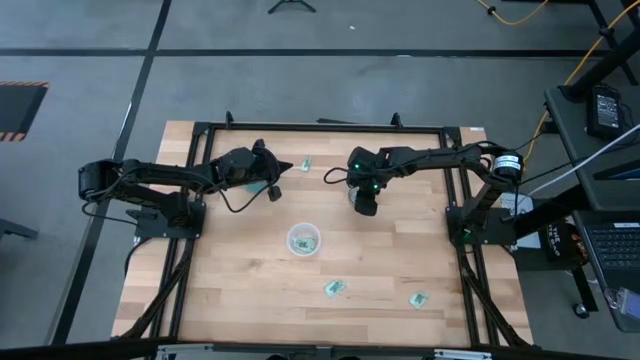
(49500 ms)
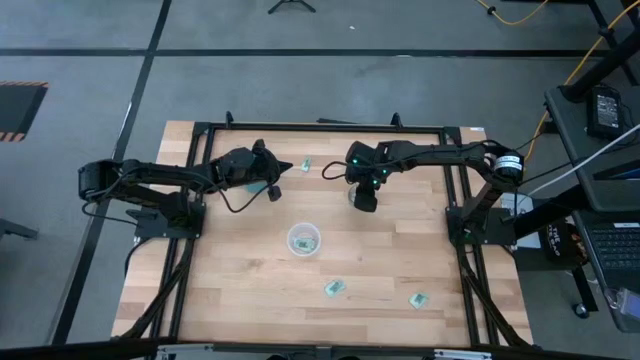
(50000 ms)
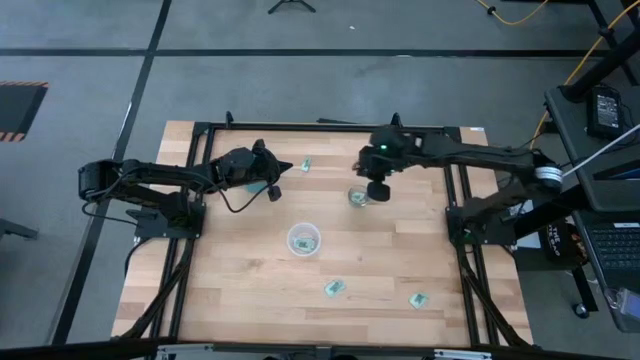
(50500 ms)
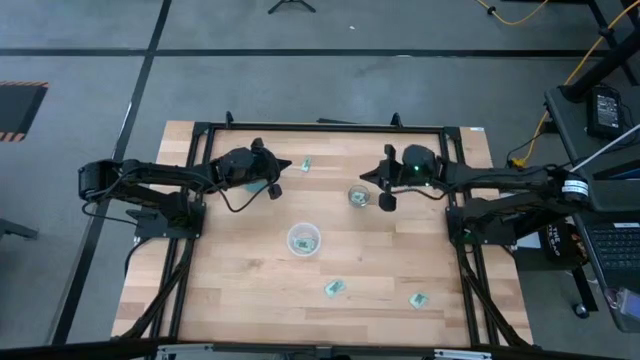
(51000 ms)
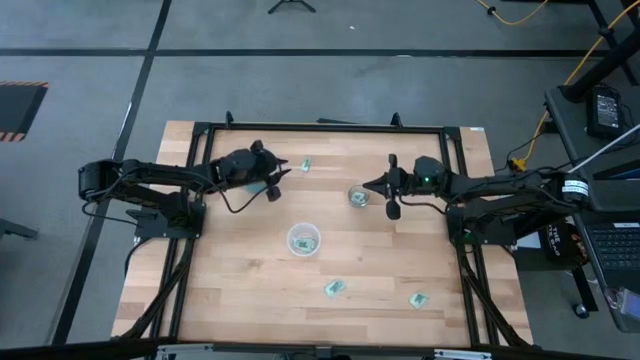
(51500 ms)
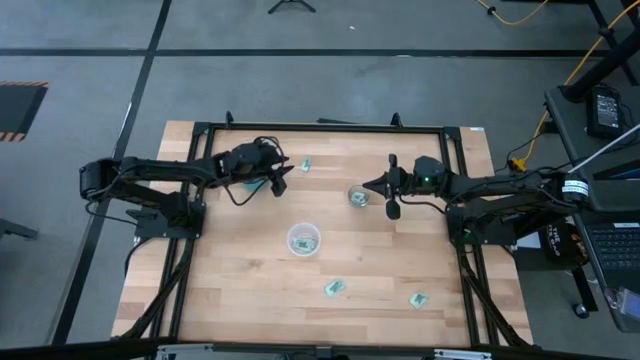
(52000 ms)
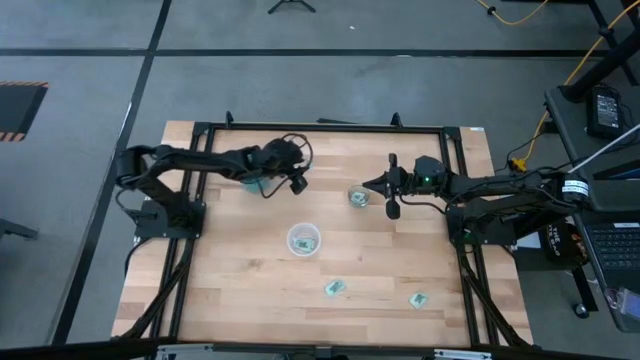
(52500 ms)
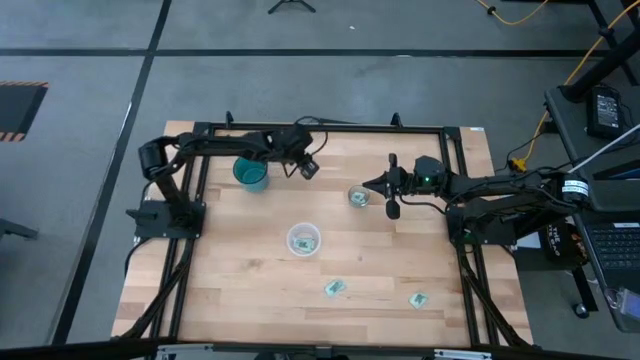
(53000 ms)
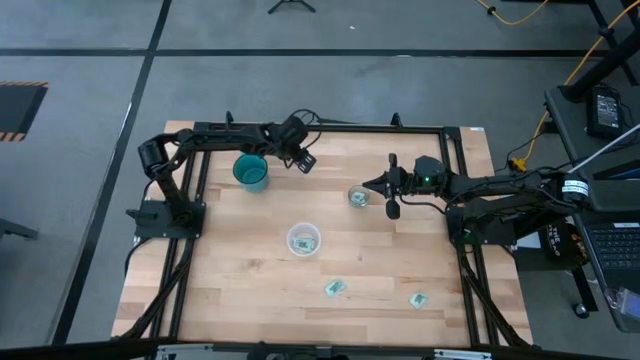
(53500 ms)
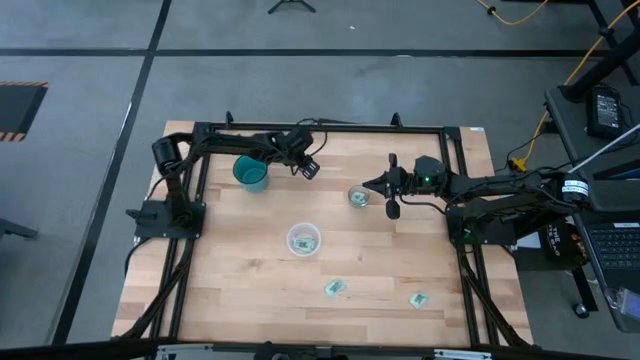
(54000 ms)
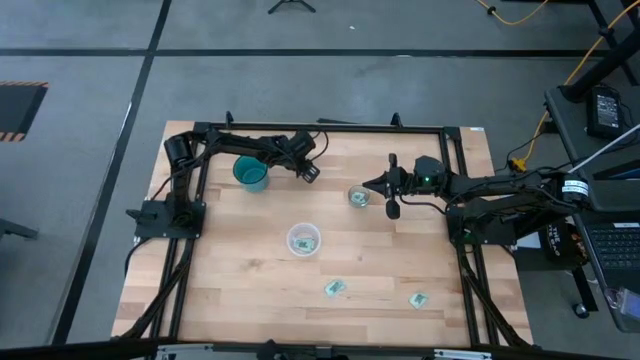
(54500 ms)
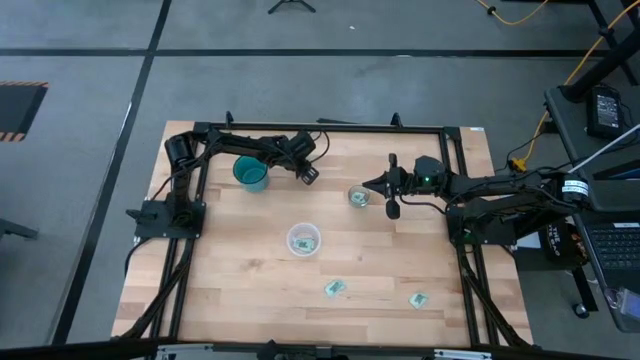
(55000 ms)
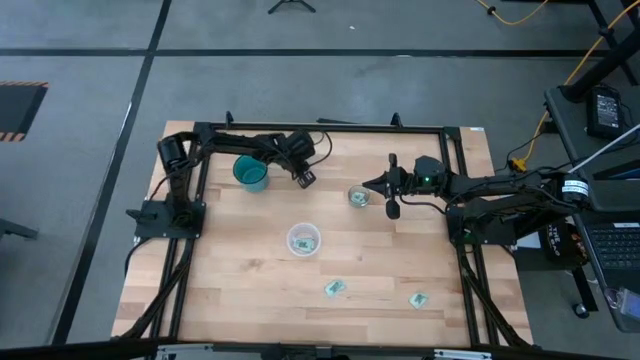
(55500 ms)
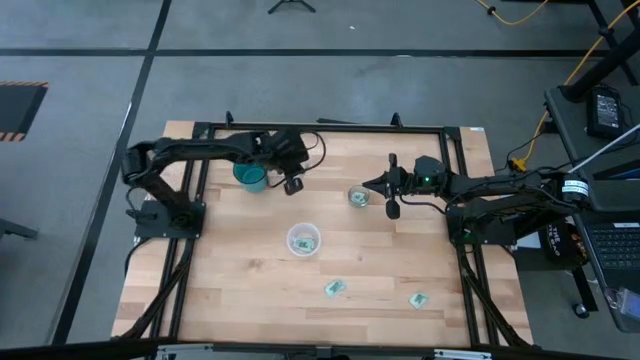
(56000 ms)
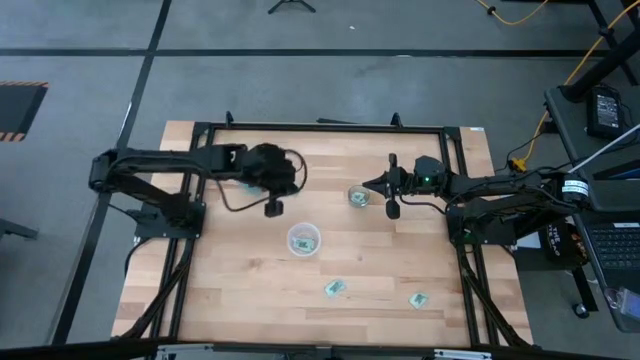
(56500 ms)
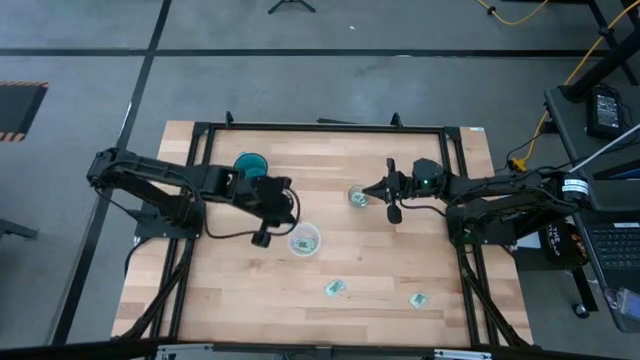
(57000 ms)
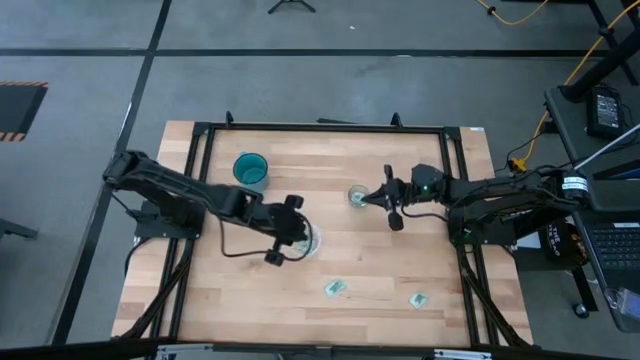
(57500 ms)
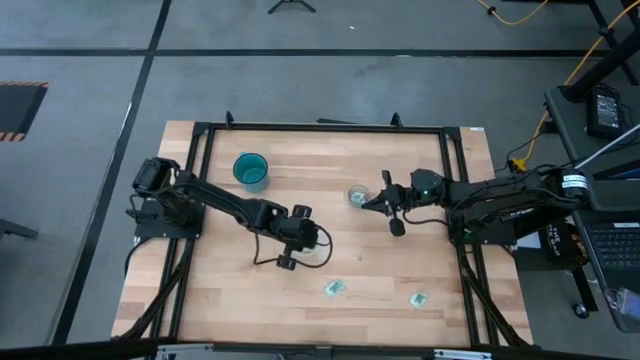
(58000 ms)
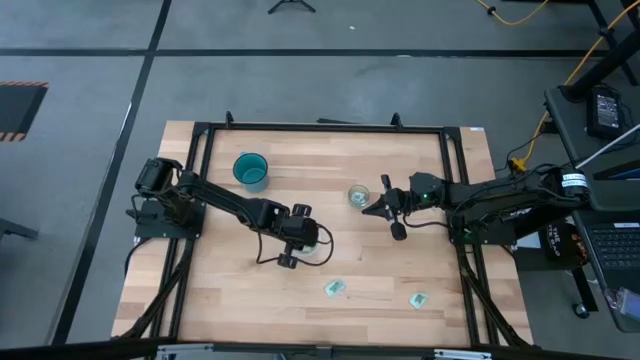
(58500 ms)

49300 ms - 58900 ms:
Task: Pick and place Stevia / Truvia into bins
Put the white stevia packet into the transparent plastic container

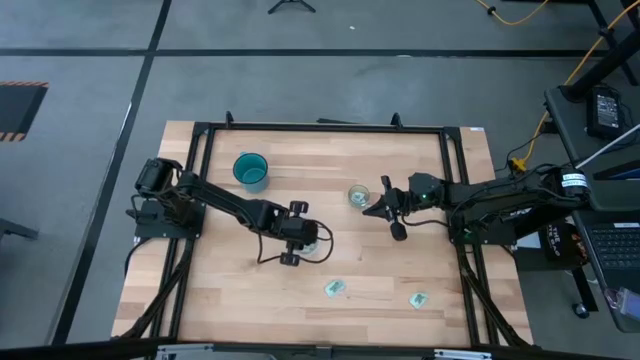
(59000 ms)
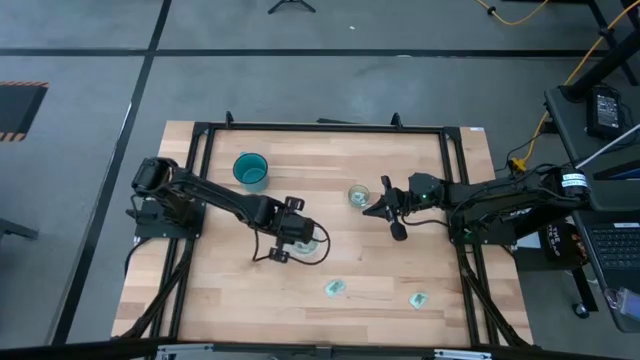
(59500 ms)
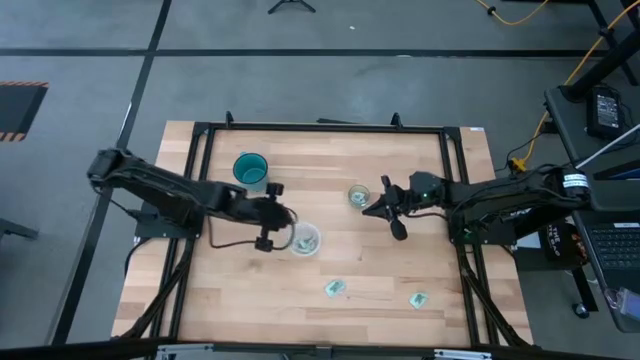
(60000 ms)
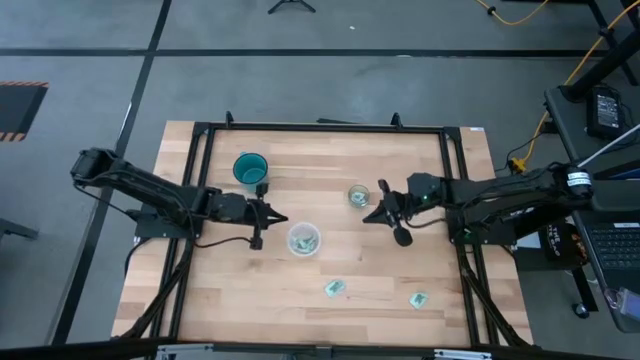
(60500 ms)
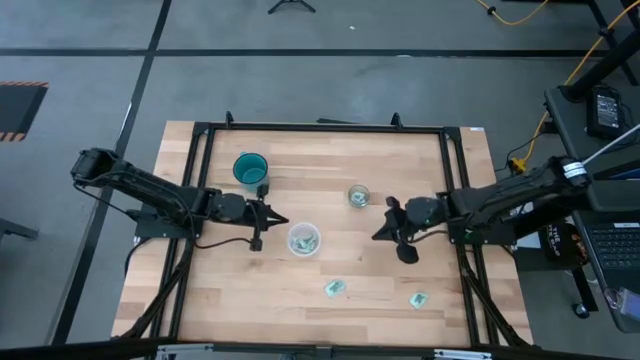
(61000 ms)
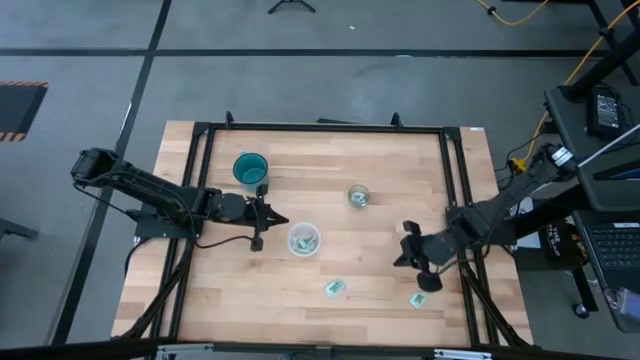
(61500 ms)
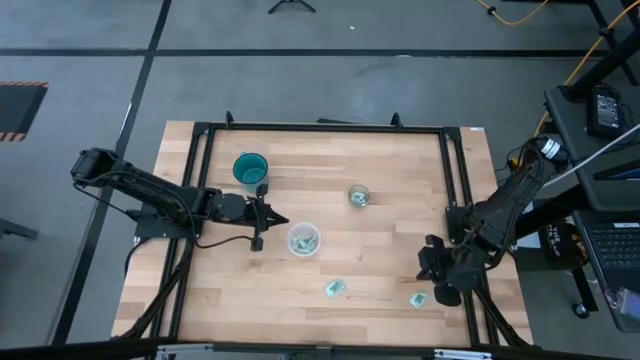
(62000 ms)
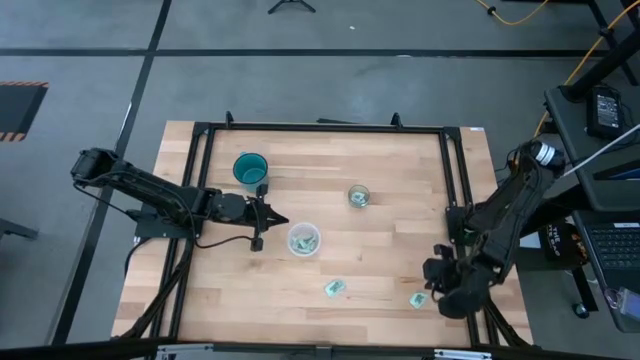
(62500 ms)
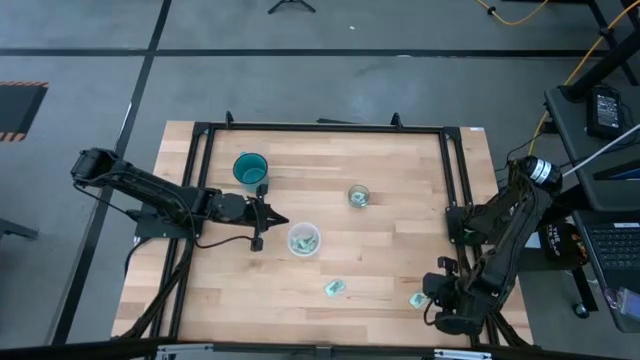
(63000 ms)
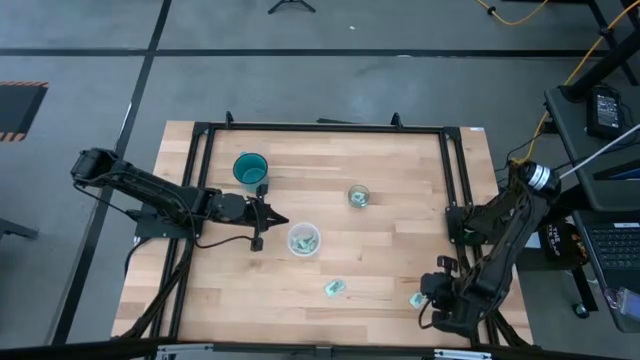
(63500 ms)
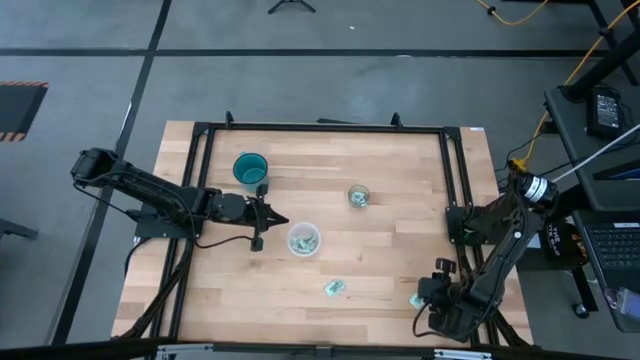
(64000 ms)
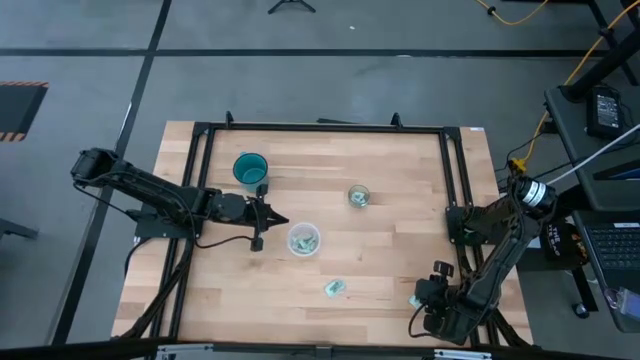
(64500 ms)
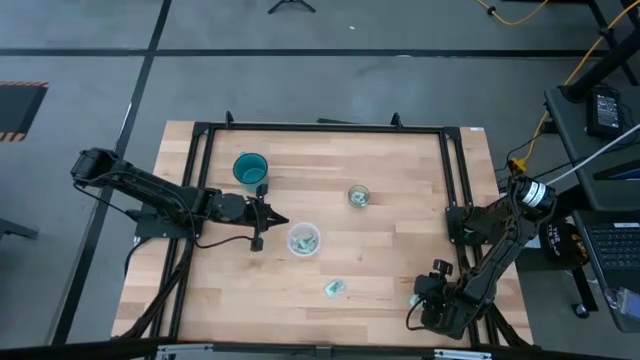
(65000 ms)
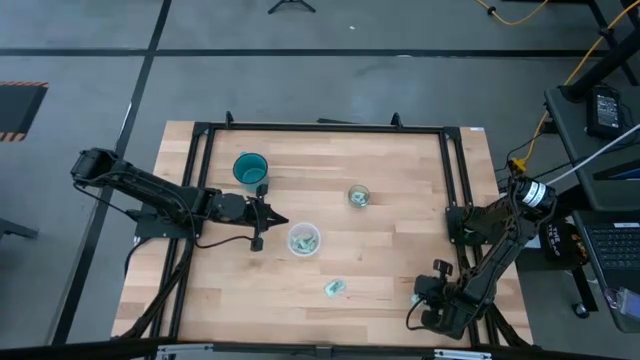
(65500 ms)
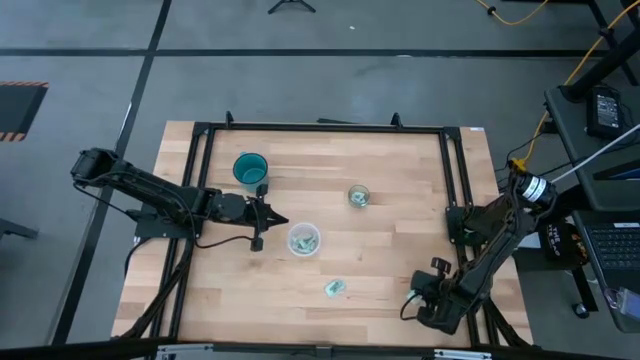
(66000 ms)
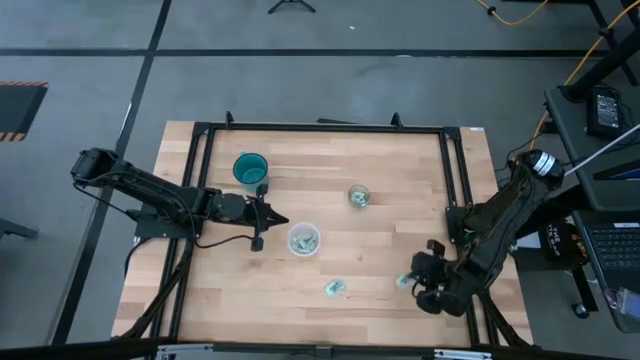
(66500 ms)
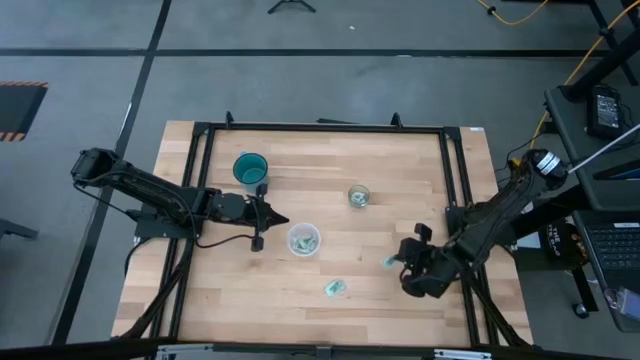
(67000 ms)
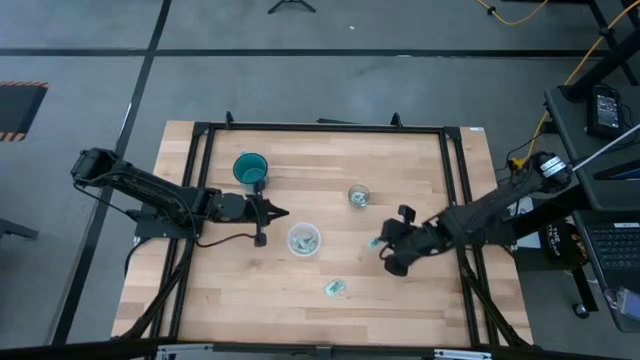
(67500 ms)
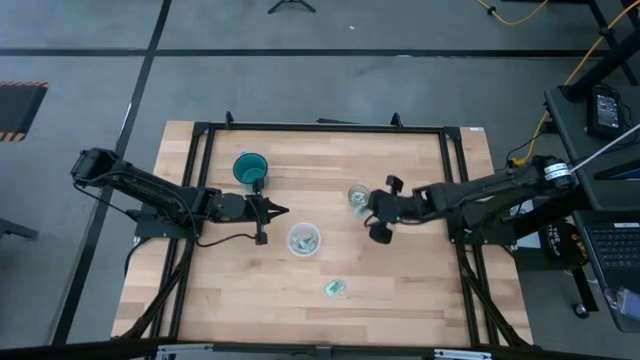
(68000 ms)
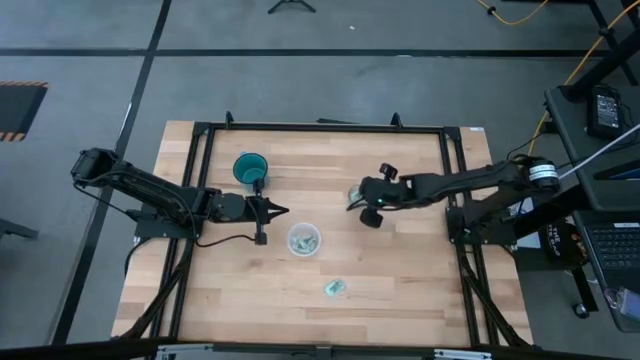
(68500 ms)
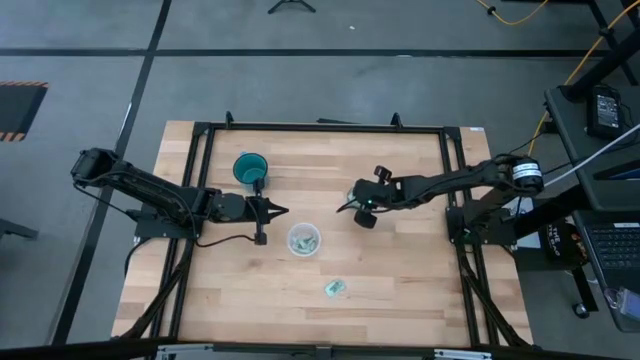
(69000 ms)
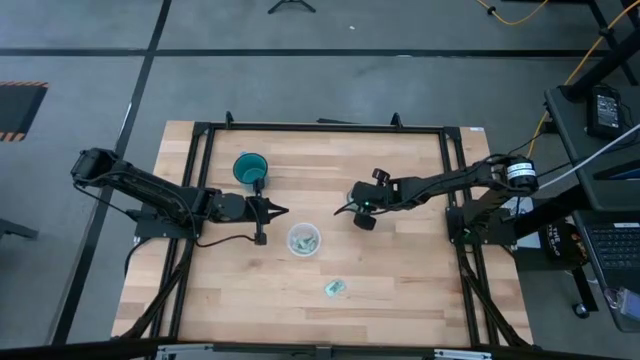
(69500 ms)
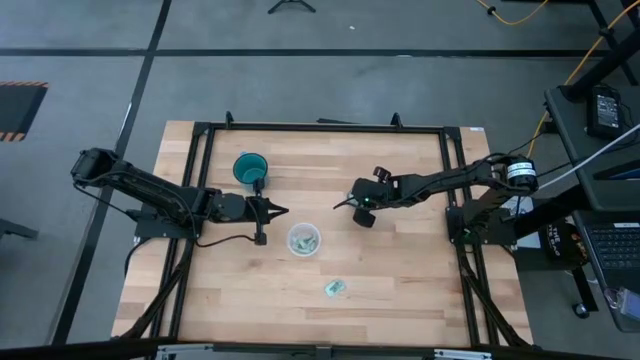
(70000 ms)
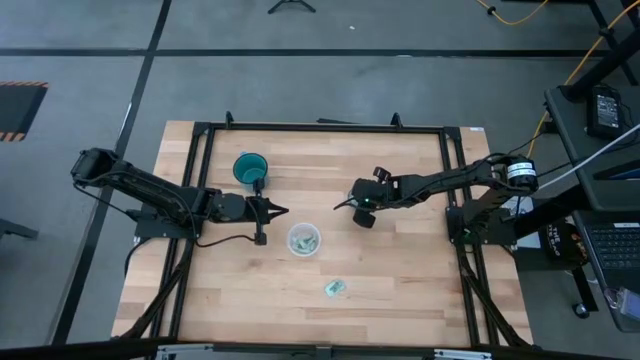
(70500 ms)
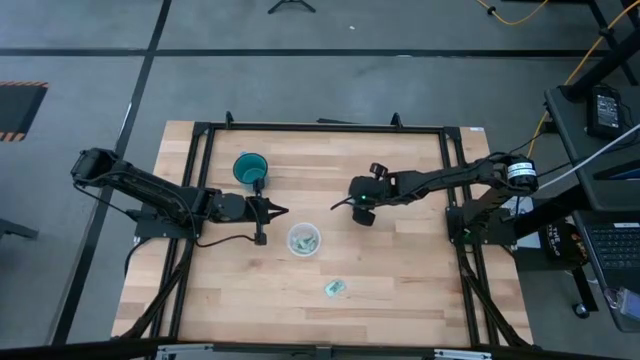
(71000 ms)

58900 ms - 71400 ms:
Put the white stevia packet into the transparent glass container

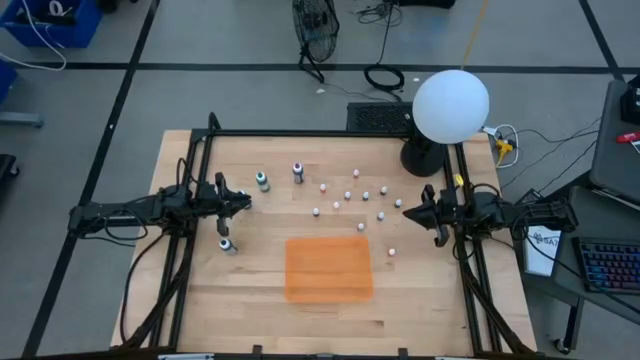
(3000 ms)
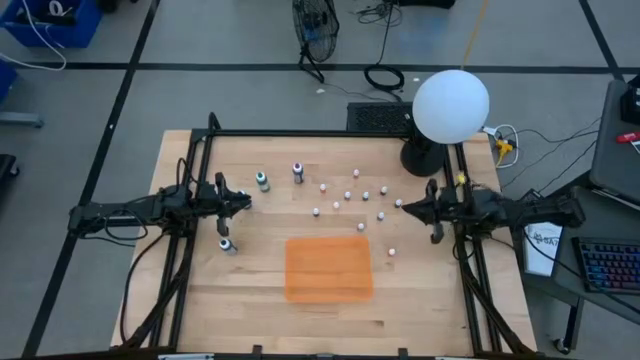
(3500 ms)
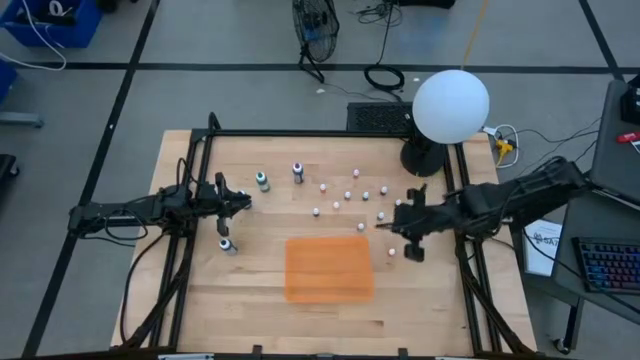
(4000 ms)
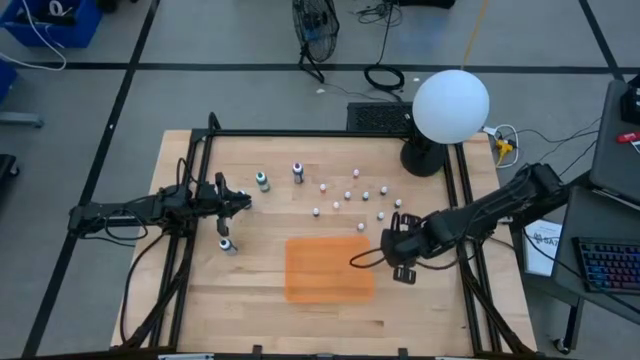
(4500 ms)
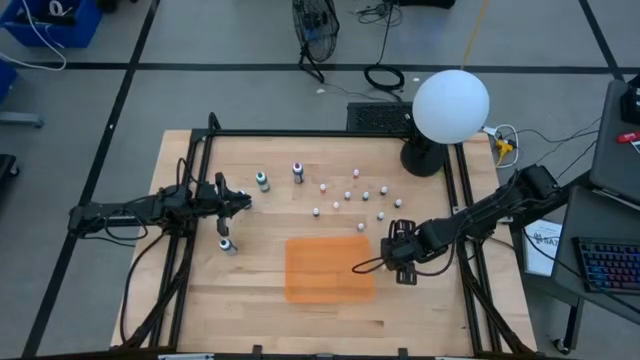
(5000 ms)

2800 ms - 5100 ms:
Task: Pick & Place food coloring
Put the small orange food coloring bottle into the orange bin
